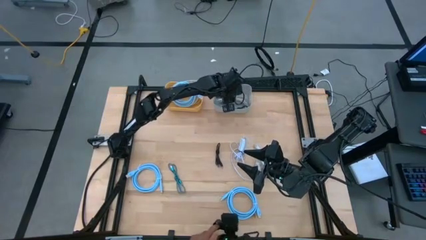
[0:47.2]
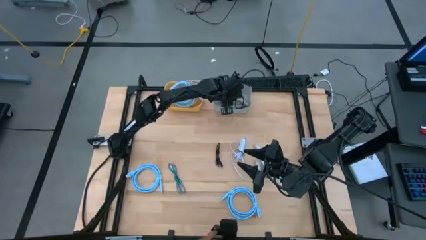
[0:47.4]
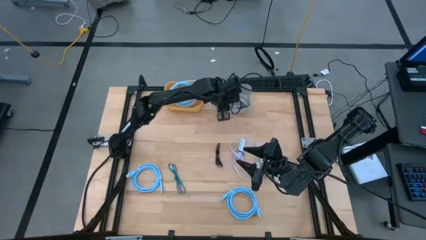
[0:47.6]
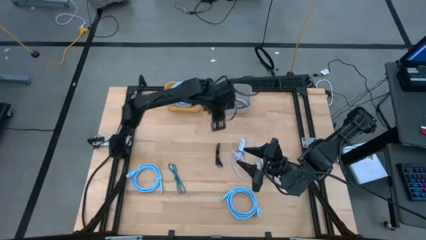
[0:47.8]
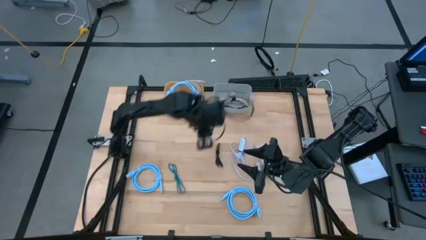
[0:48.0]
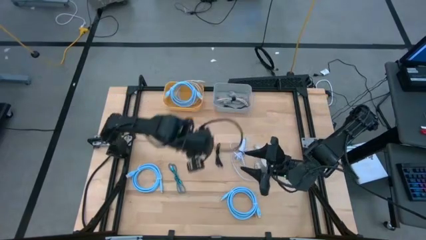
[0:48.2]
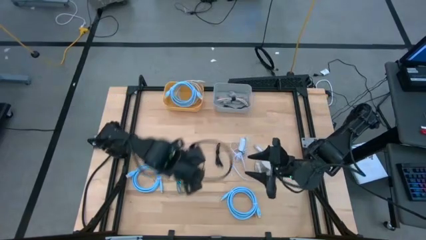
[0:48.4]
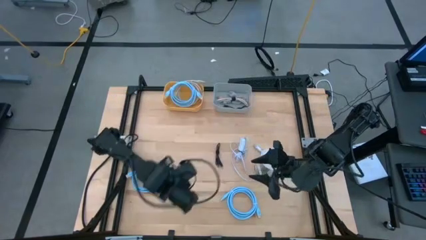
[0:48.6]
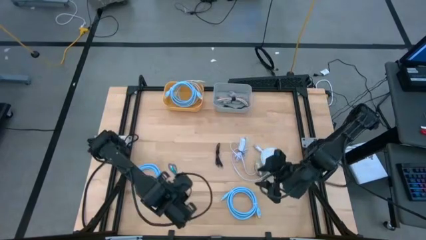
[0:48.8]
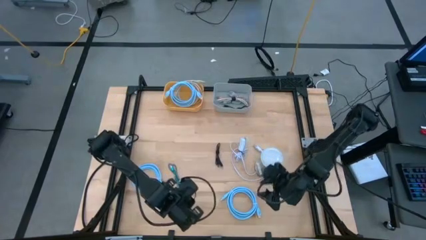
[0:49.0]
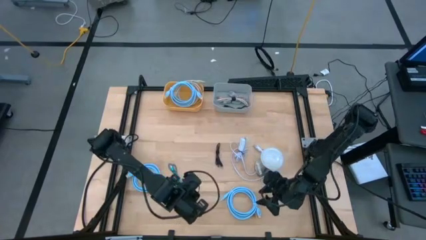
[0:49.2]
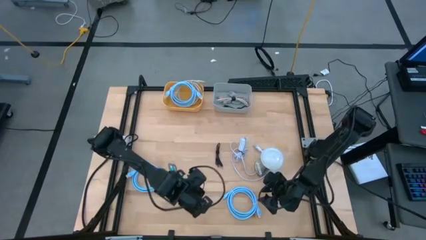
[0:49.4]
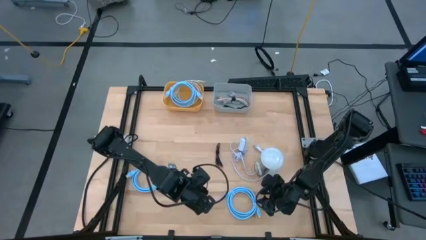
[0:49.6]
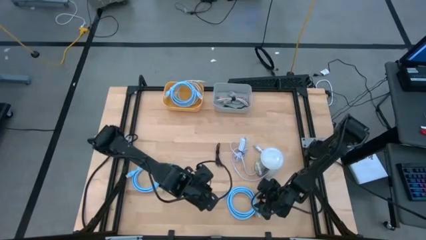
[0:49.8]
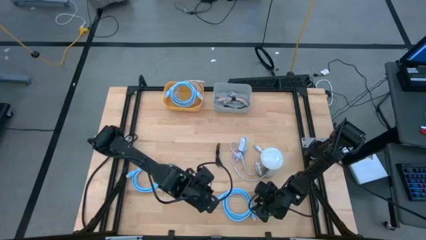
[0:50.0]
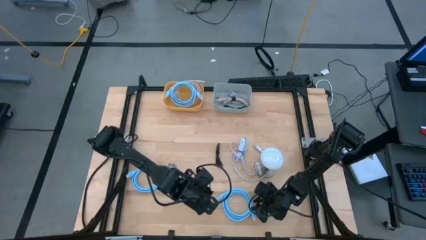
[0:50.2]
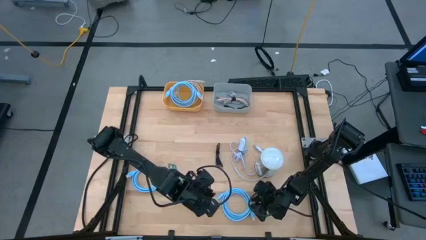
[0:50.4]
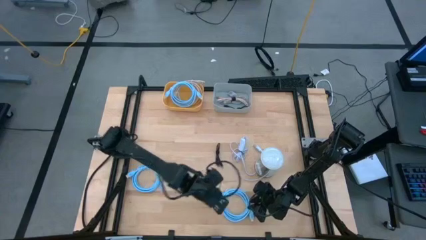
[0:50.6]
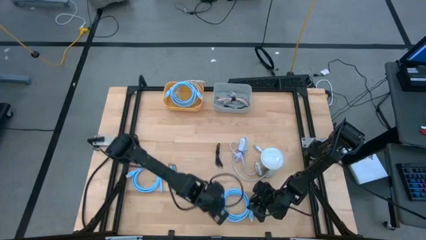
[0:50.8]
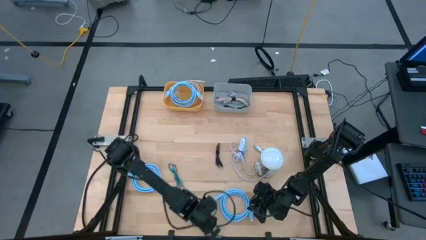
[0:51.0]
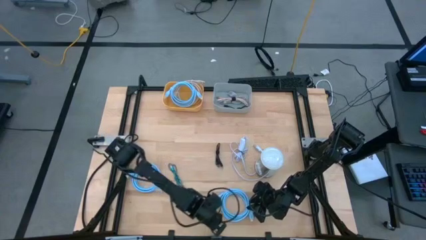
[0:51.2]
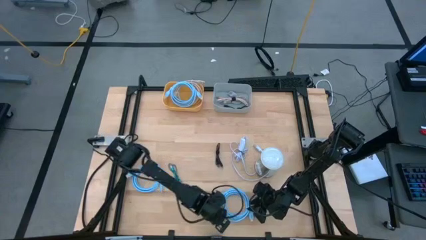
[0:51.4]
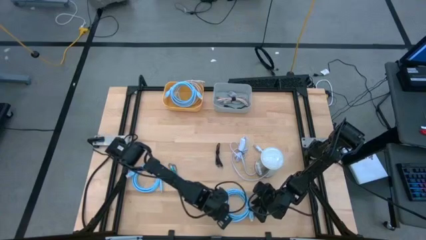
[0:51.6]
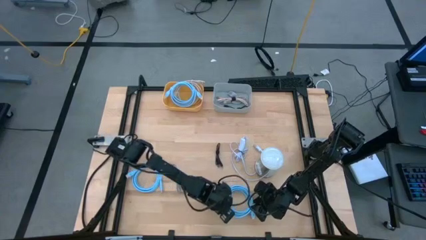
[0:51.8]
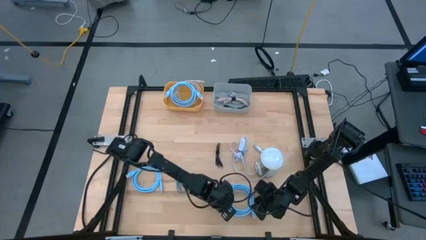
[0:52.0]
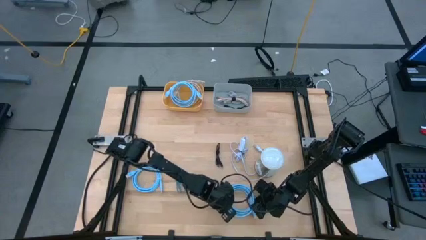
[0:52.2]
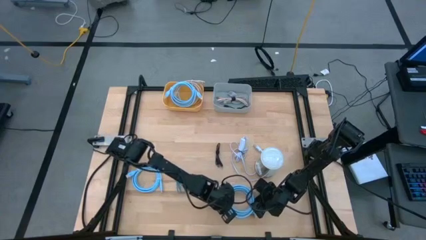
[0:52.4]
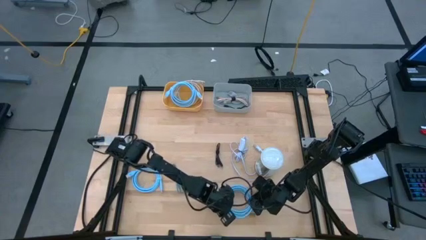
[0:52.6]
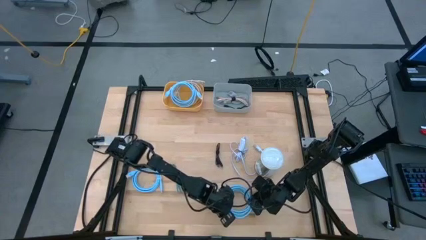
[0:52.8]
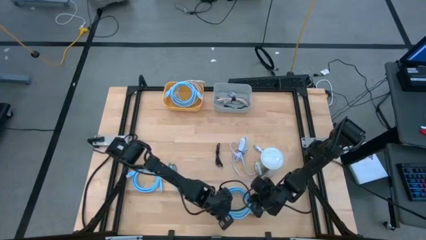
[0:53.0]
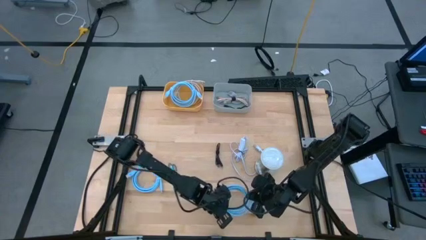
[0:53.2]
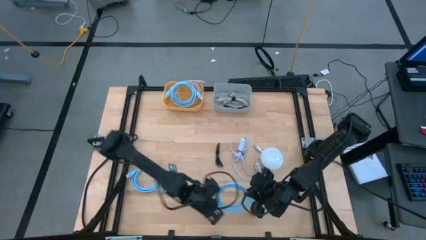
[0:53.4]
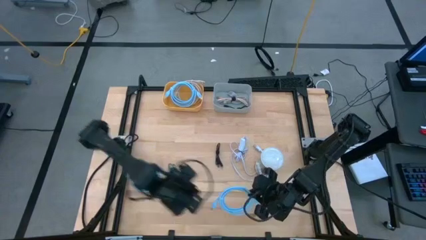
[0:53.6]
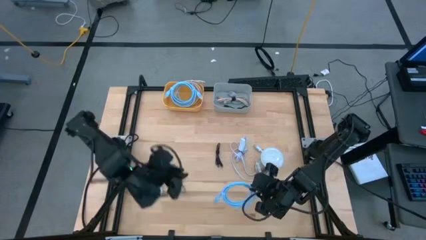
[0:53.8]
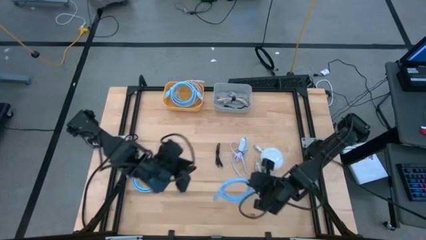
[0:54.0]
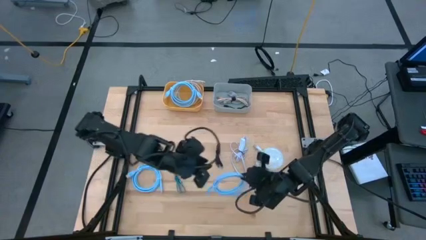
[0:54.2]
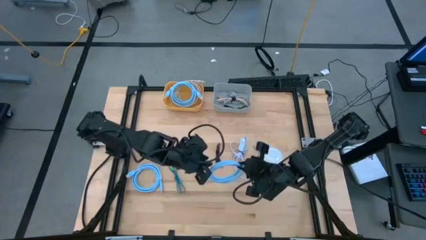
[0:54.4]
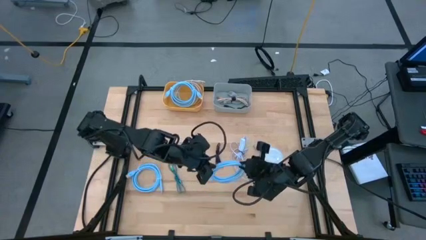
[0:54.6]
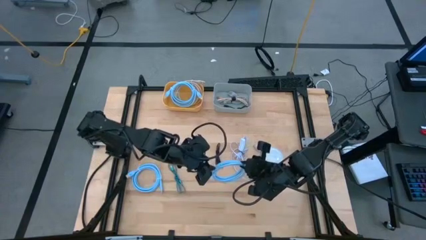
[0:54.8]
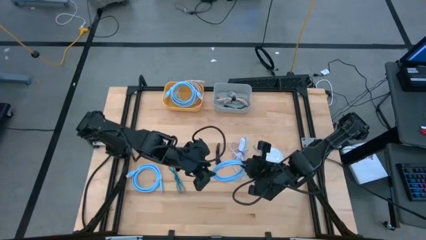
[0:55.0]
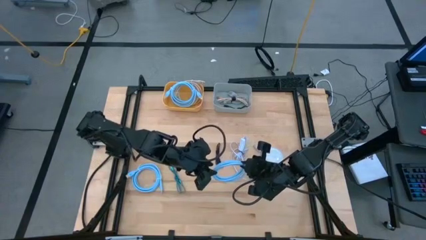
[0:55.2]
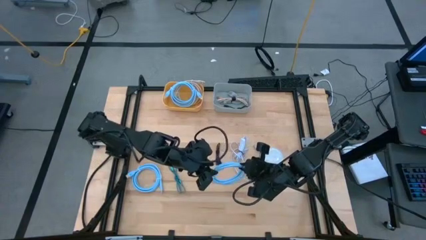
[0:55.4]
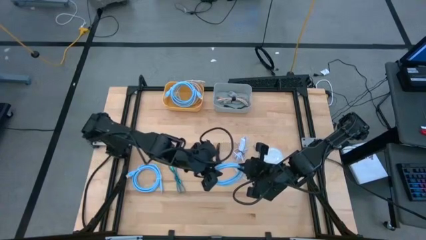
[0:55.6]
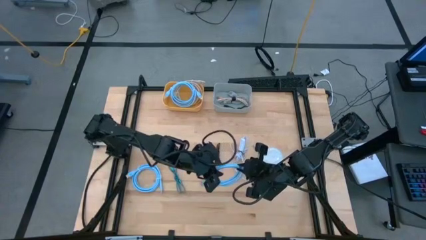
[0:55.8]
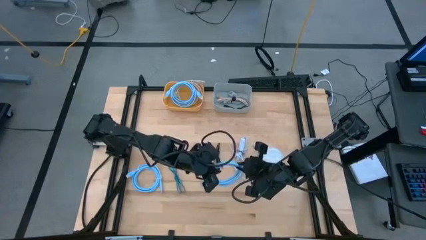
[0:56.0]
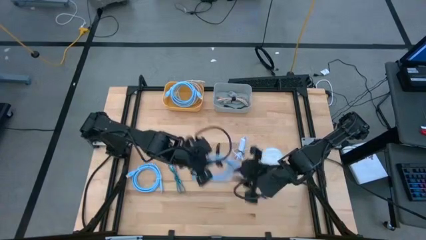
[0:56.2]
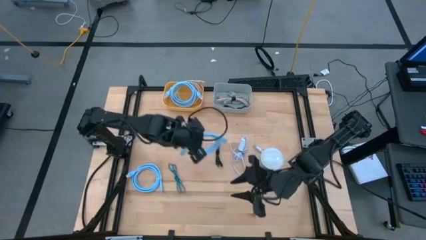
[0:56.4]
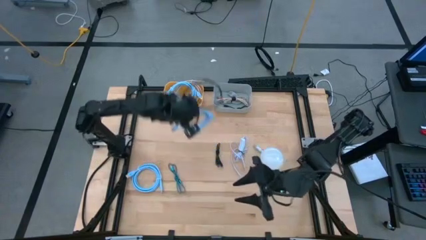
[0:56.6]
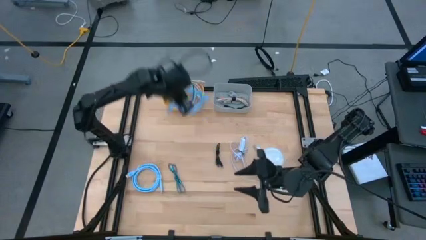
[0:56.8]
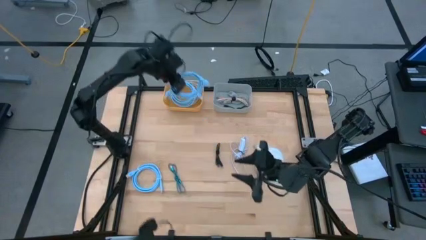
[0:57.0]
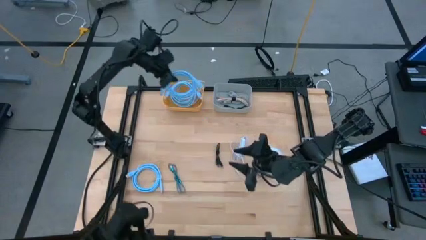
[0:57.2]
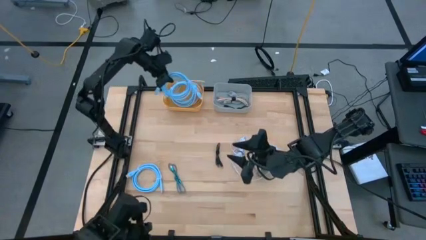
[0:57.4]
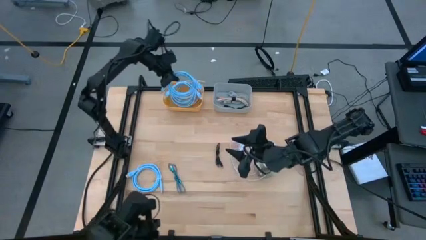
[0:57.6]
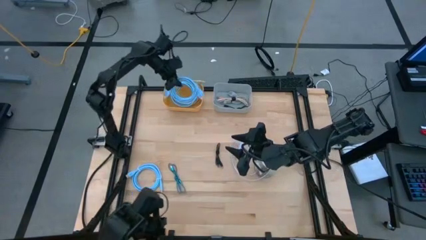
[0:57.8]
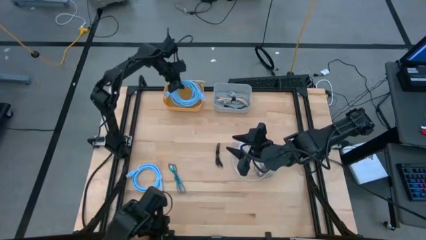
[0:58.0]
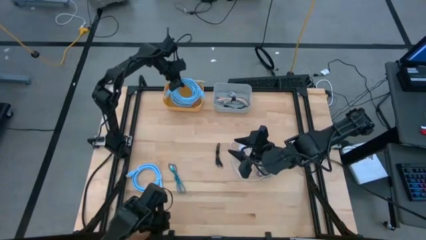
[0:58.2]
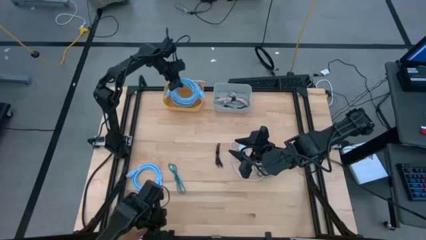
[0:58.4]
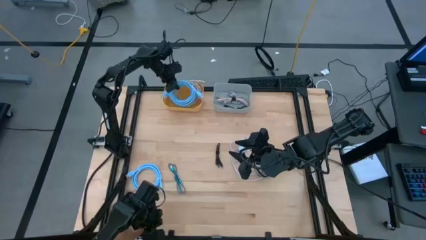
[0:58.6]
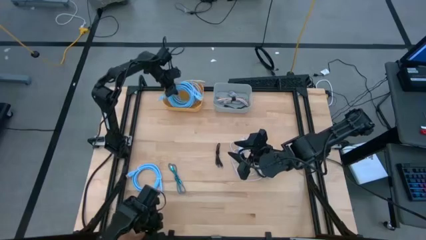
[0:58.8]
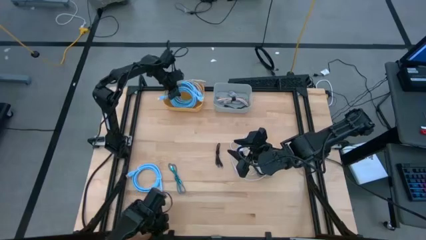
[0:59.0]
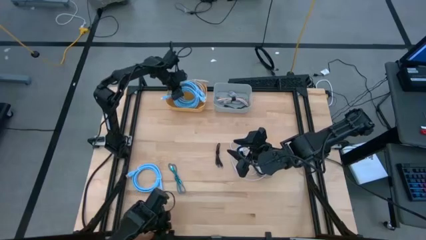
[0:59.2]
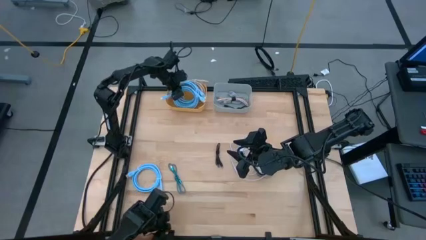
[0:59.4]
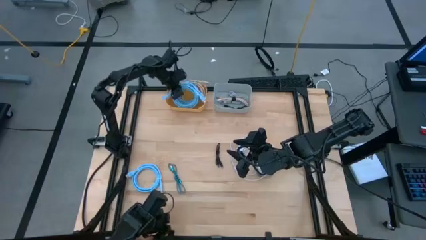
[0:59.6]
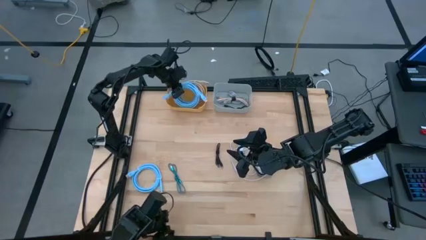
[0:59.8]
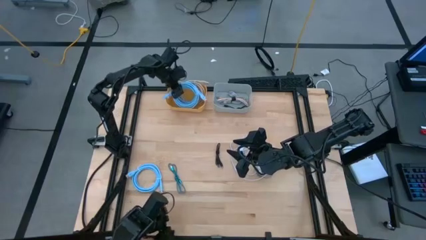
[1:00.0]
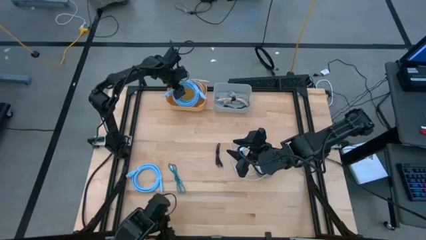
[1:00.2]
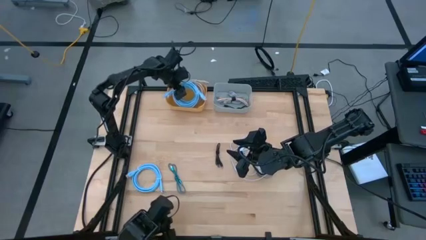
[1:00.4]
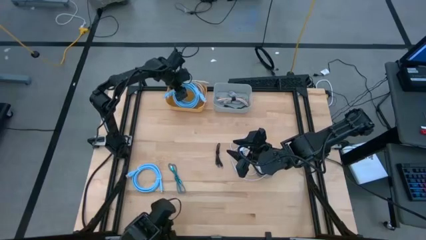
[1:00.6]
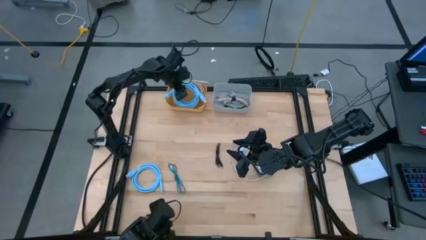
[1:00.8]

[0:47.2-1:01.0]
Task: Pick & Place USB Port
Put the right blue HDMI cable into the yellow bin
